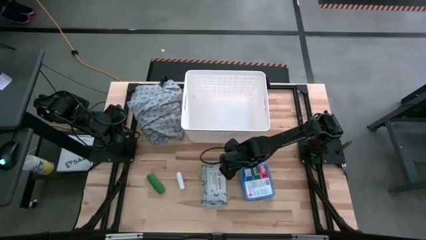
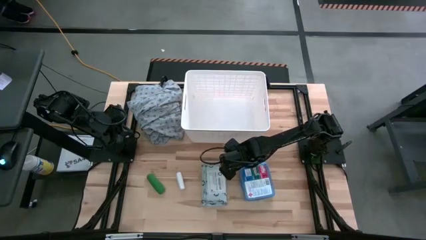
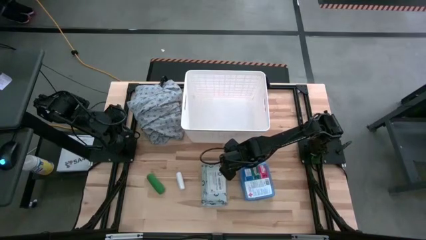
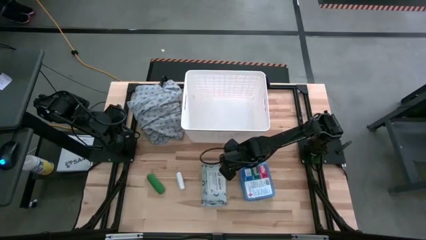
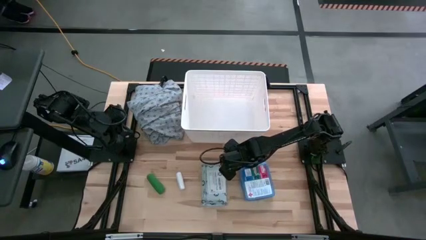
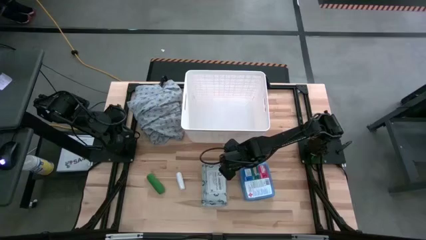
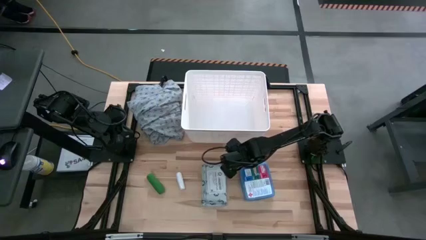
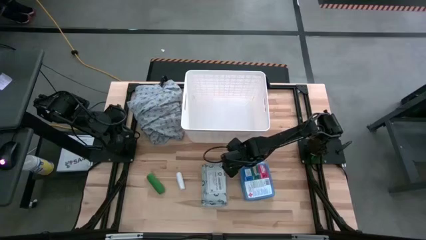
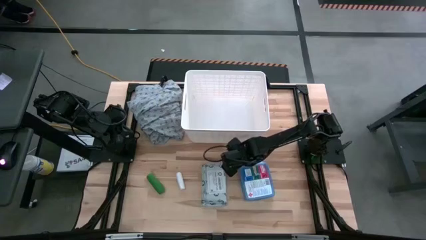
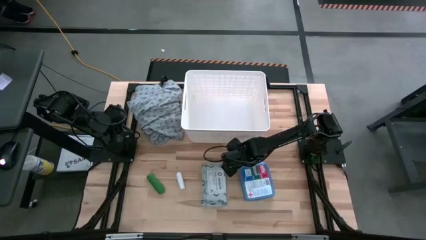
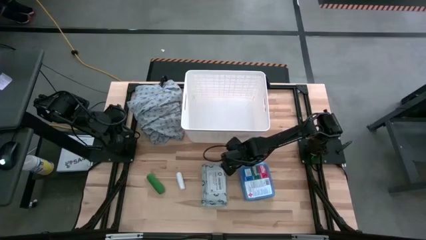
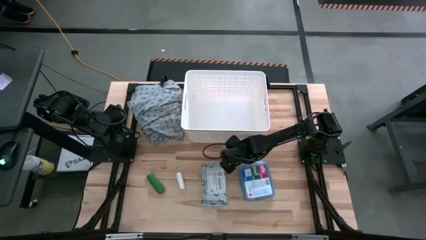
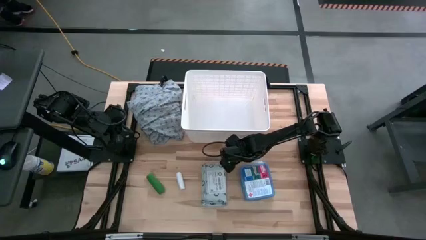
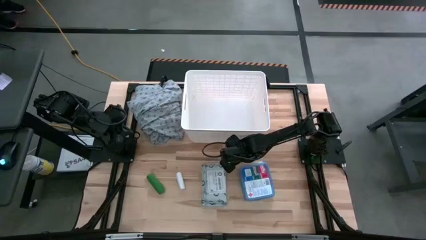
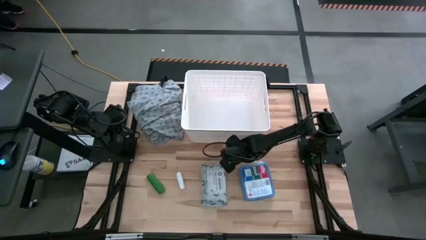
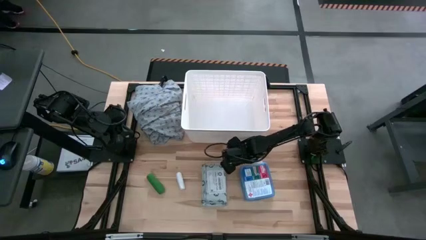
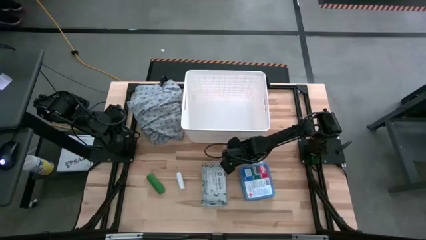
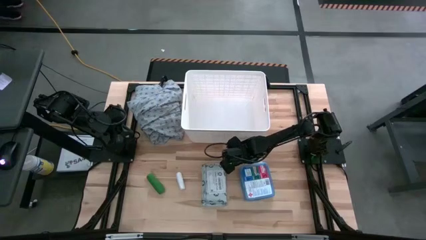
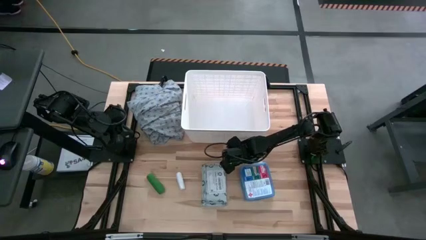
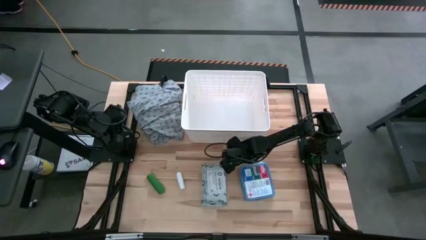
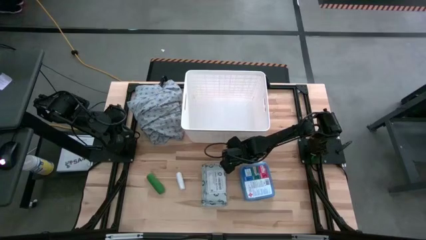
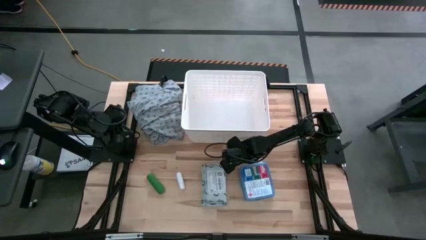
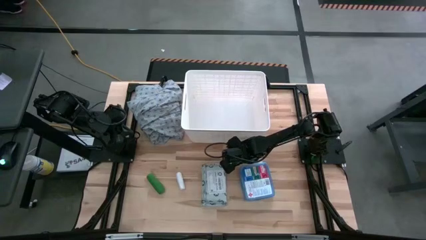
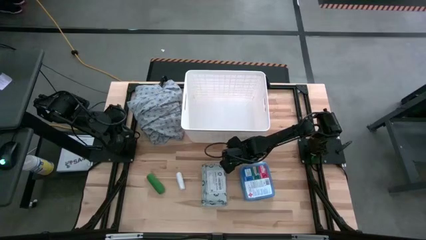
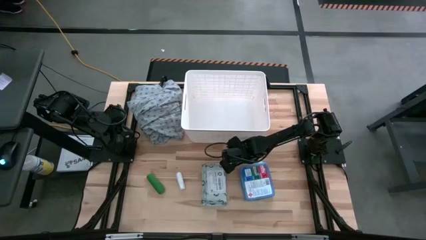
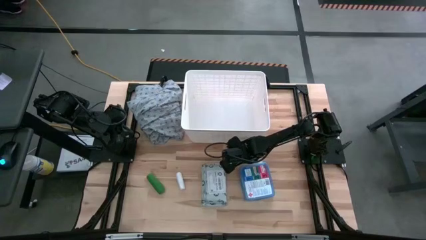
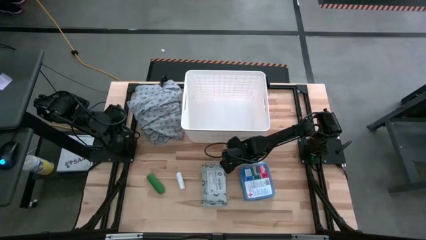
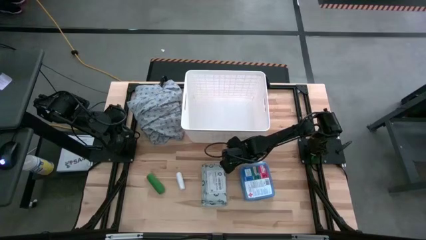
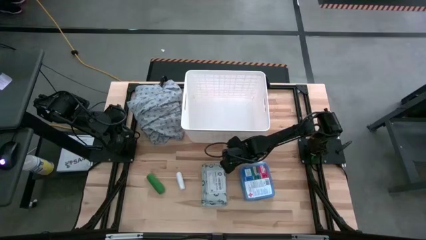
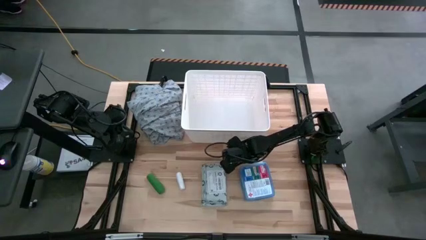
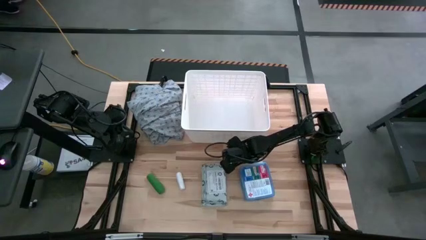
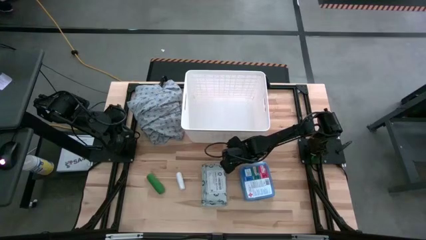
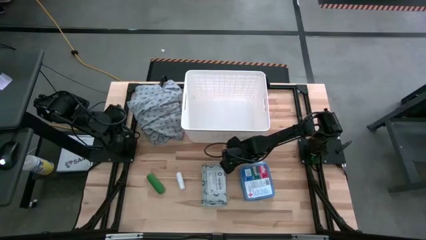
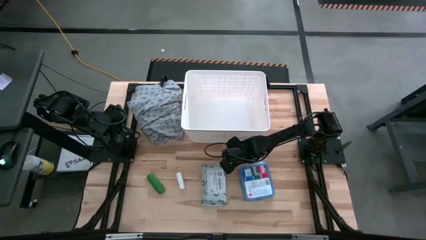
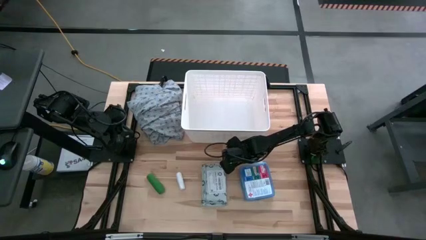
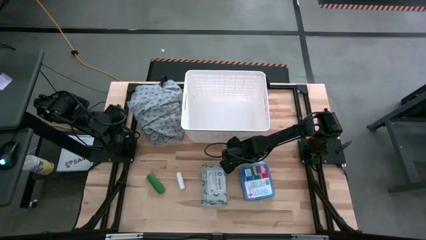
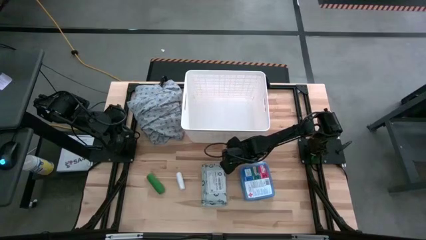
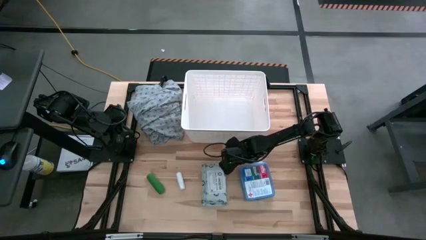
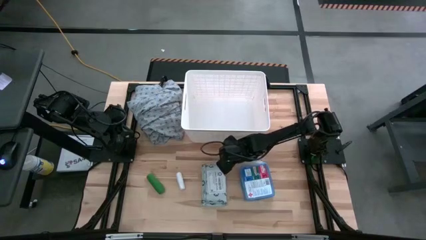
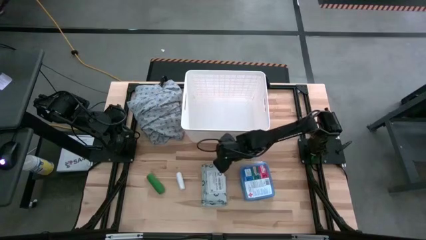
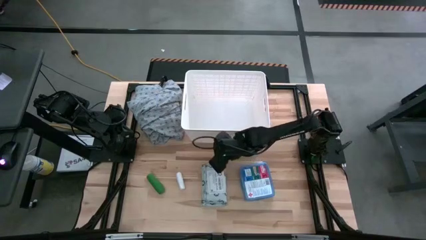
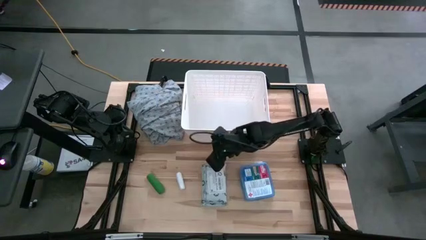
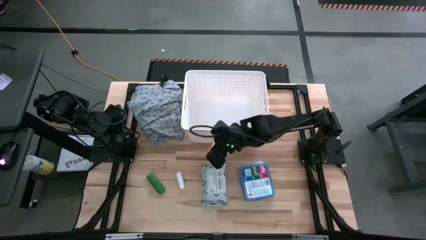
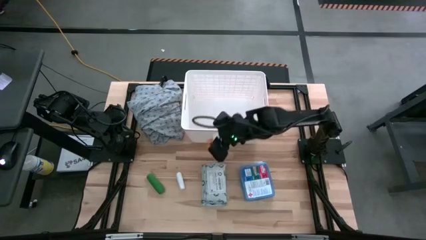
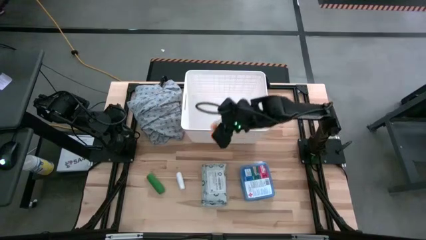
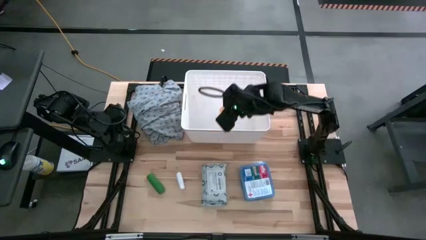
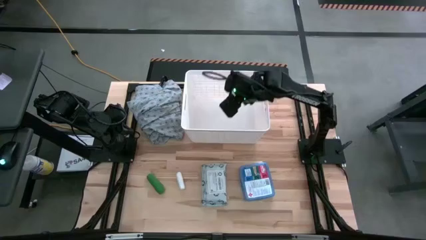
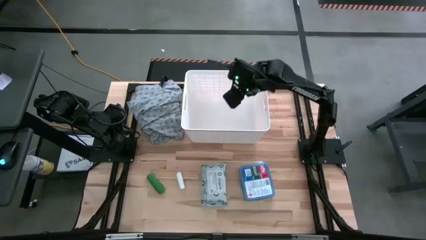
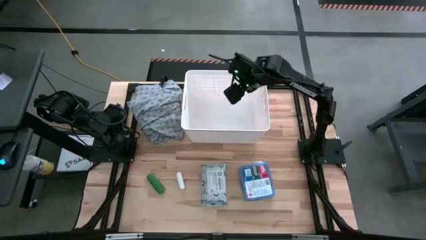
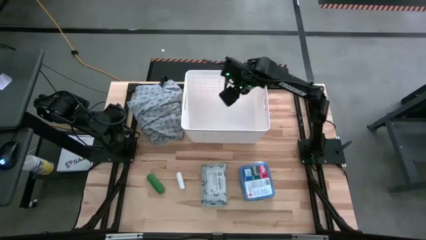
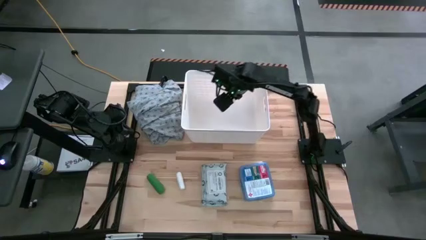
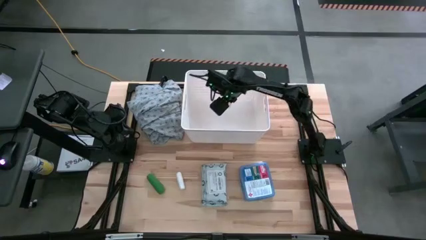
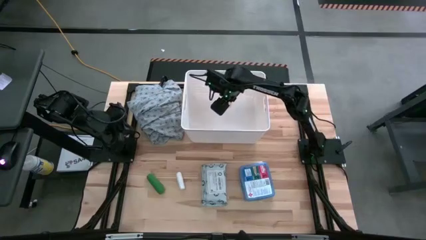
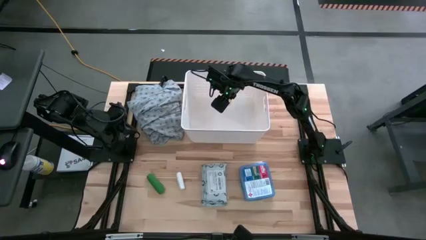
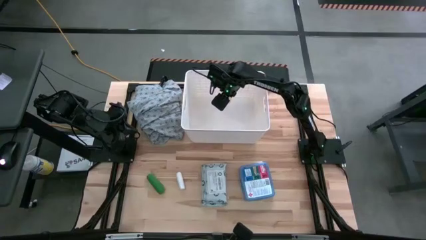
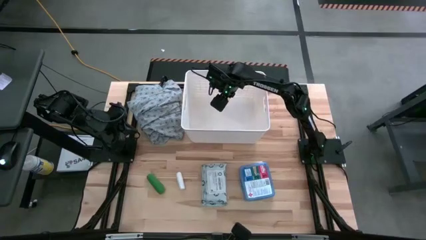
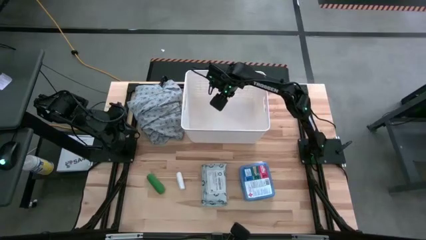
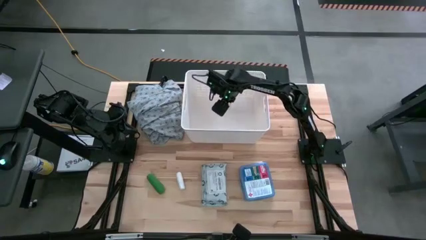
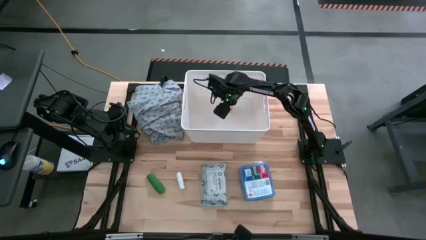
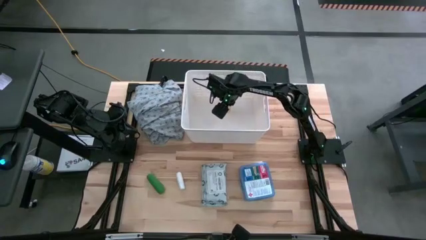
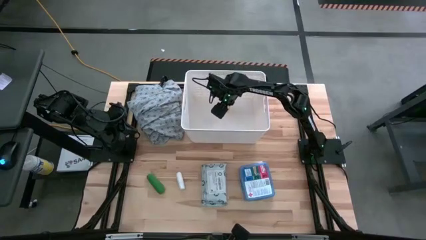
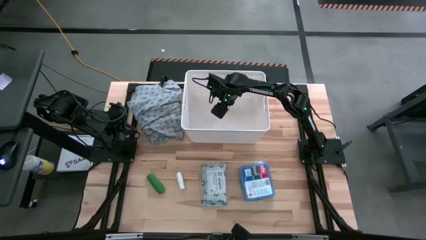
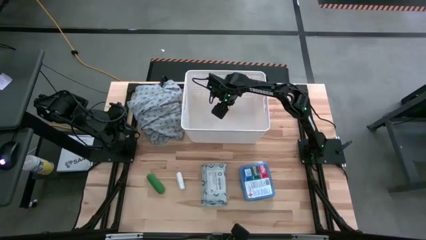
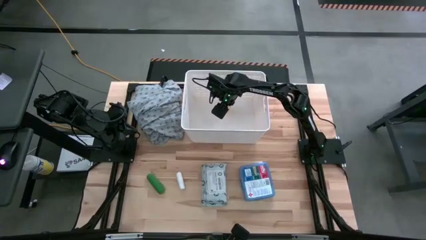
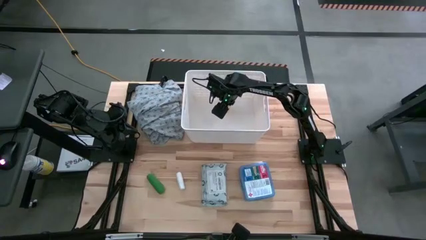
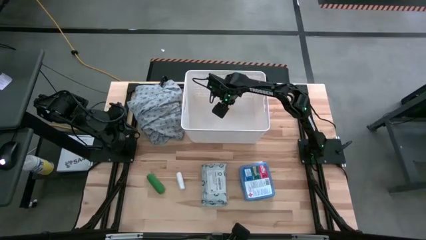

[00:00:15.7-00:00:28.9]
Task: Pick & place medical supplies in basket/bin
Put the orange pill bottle in the white bin
